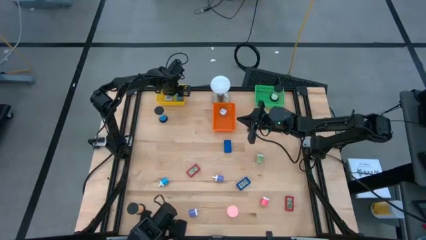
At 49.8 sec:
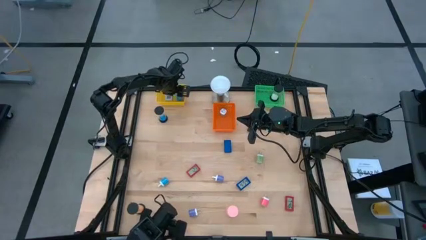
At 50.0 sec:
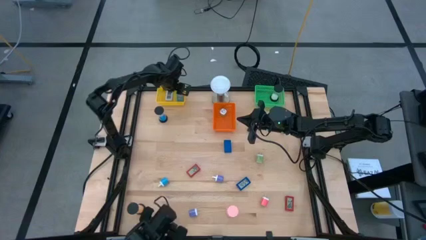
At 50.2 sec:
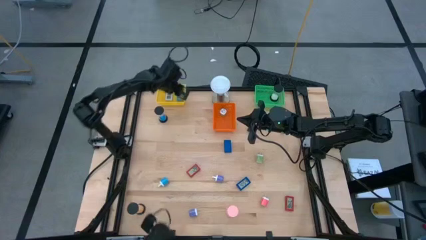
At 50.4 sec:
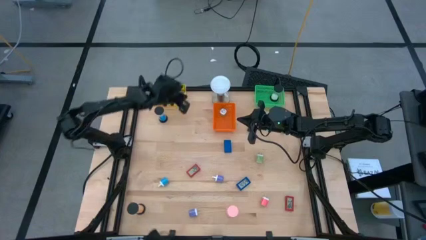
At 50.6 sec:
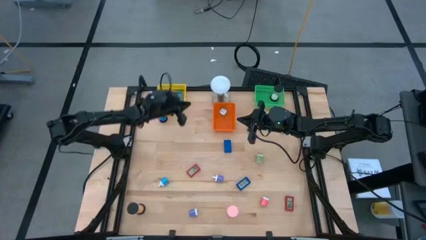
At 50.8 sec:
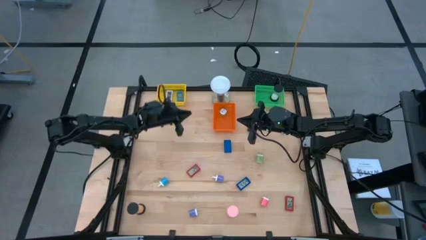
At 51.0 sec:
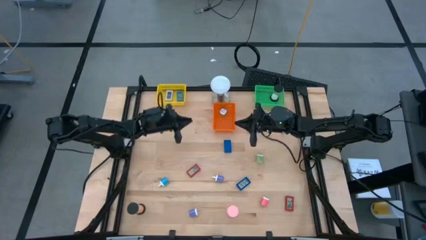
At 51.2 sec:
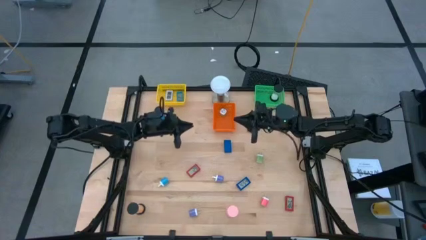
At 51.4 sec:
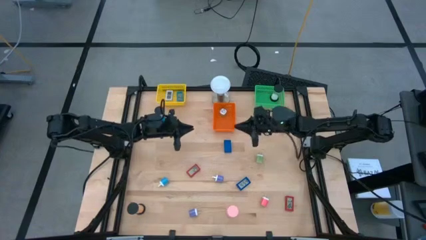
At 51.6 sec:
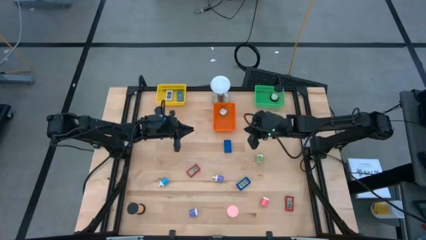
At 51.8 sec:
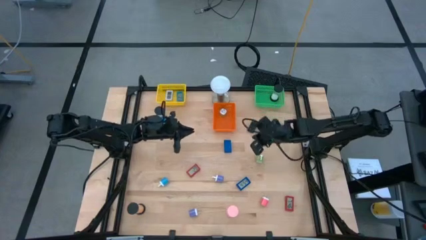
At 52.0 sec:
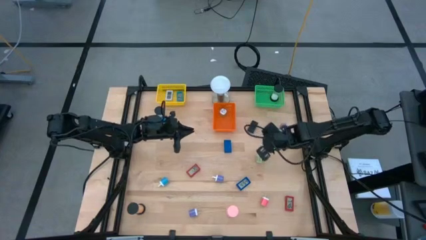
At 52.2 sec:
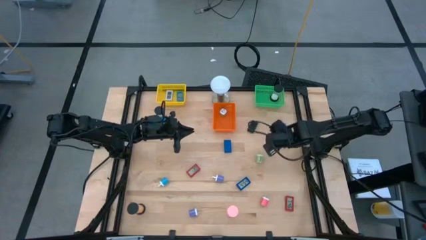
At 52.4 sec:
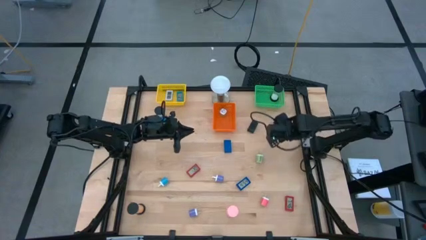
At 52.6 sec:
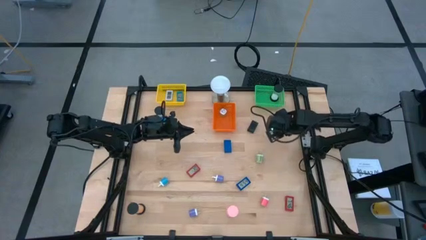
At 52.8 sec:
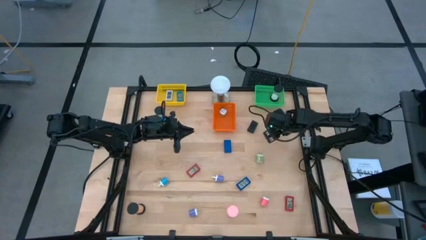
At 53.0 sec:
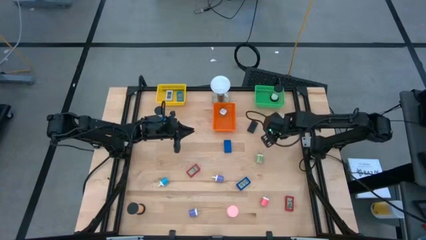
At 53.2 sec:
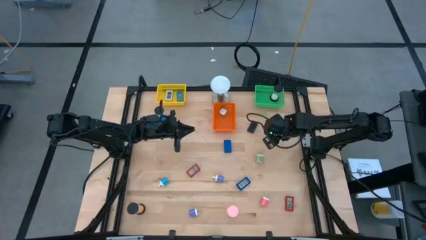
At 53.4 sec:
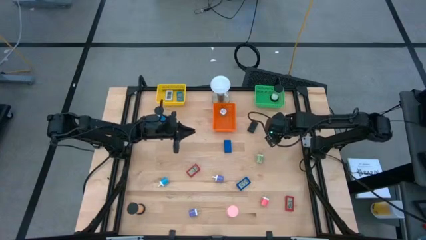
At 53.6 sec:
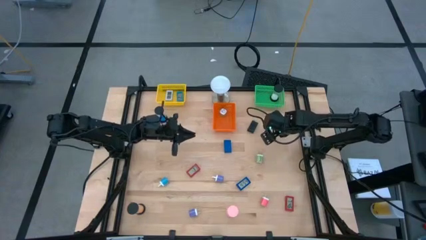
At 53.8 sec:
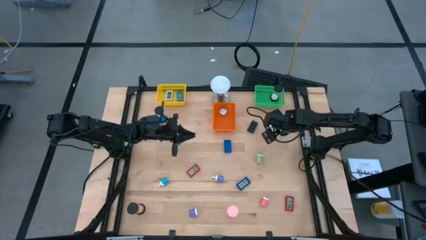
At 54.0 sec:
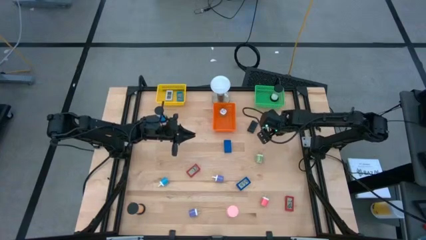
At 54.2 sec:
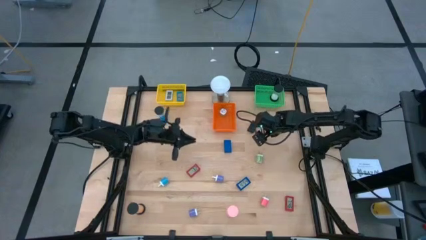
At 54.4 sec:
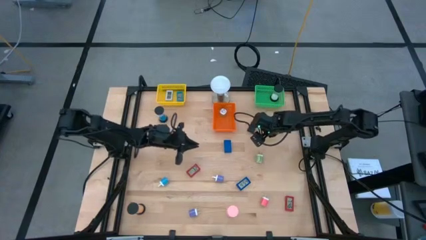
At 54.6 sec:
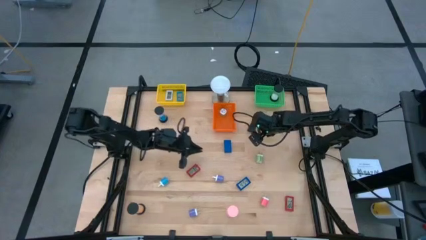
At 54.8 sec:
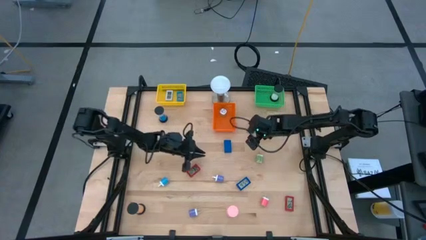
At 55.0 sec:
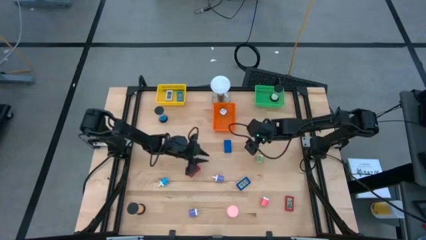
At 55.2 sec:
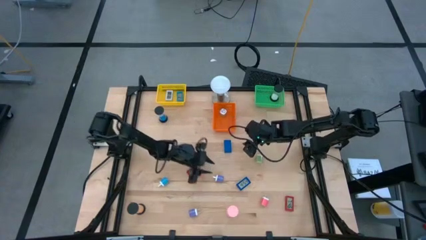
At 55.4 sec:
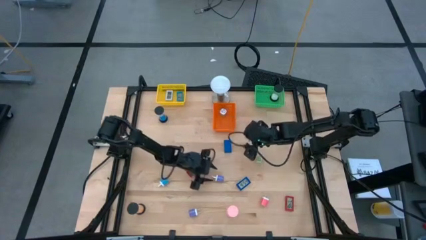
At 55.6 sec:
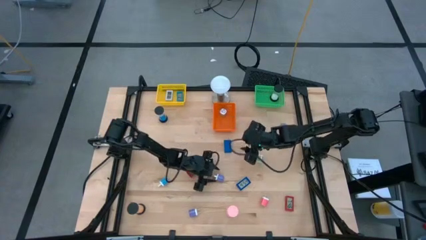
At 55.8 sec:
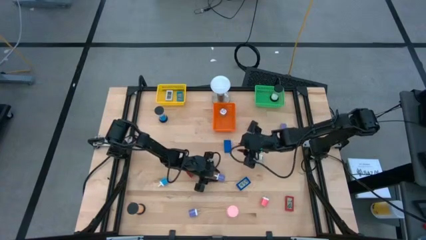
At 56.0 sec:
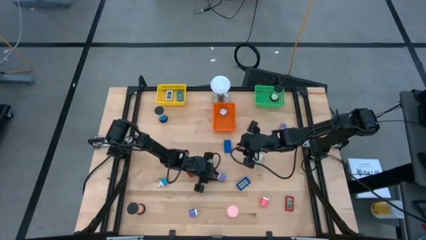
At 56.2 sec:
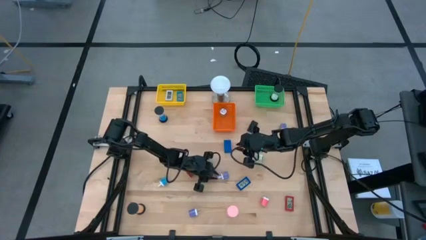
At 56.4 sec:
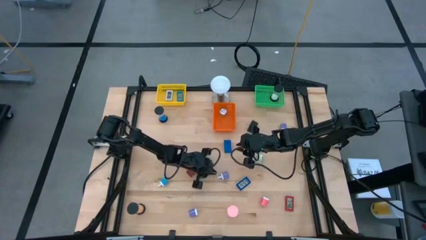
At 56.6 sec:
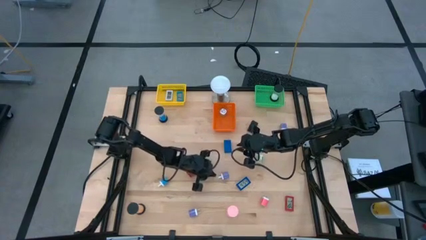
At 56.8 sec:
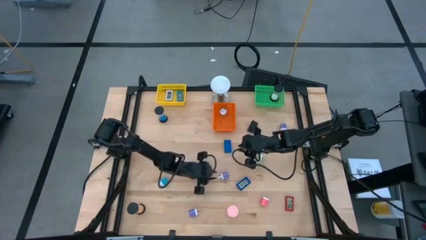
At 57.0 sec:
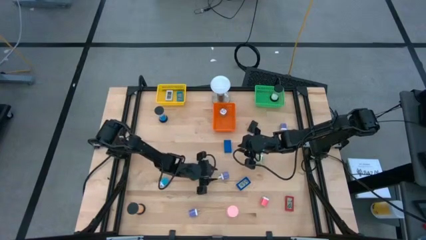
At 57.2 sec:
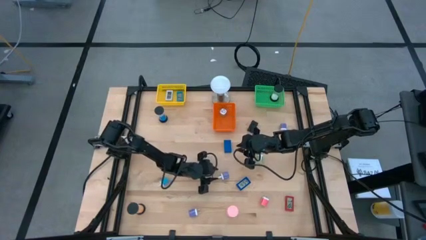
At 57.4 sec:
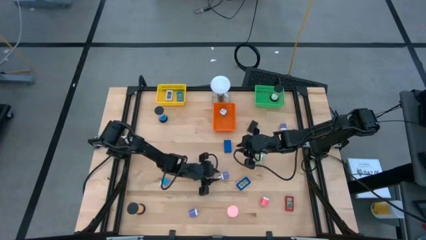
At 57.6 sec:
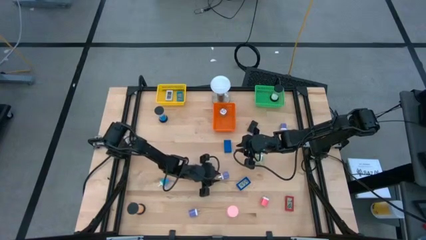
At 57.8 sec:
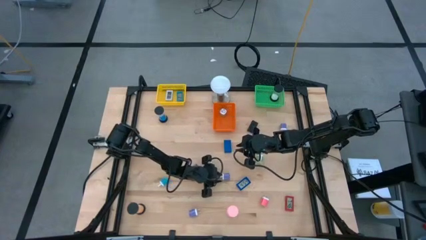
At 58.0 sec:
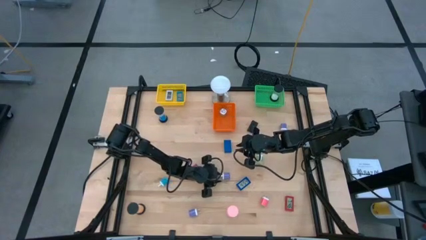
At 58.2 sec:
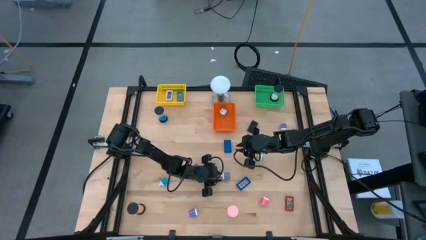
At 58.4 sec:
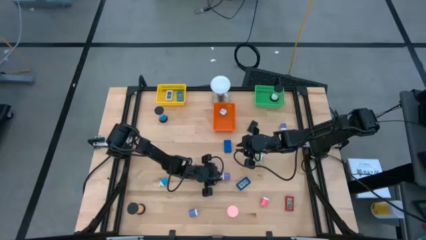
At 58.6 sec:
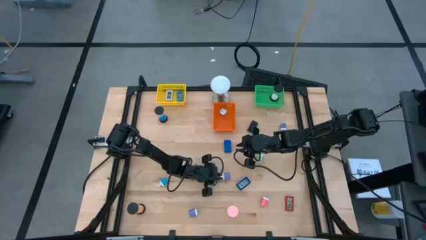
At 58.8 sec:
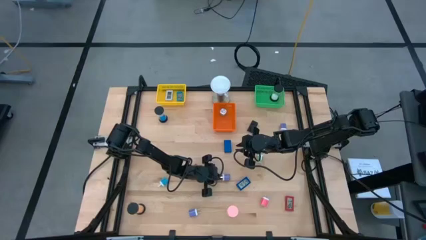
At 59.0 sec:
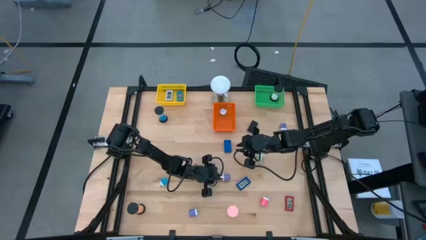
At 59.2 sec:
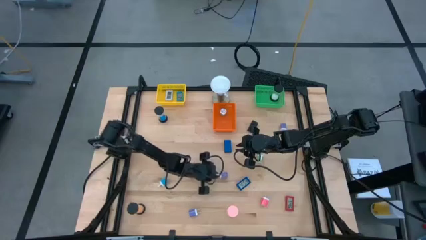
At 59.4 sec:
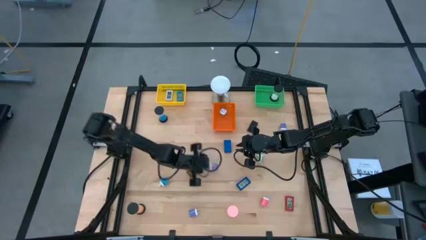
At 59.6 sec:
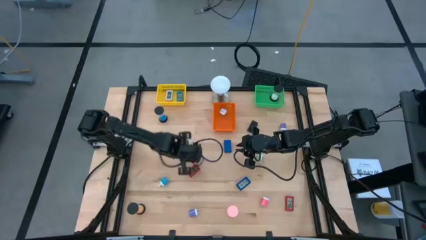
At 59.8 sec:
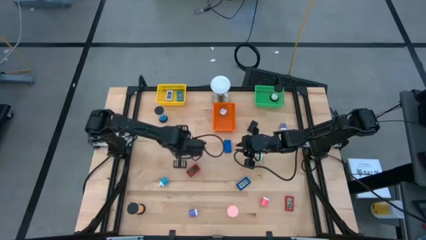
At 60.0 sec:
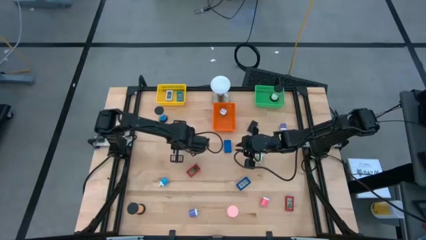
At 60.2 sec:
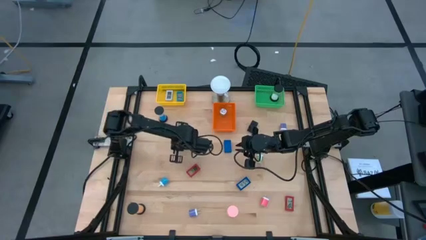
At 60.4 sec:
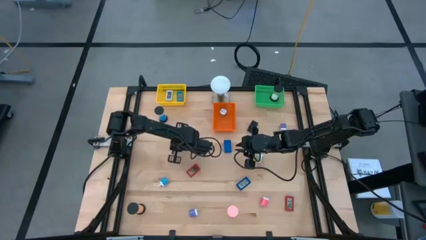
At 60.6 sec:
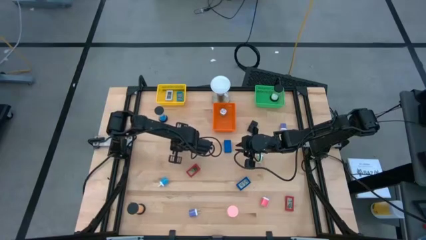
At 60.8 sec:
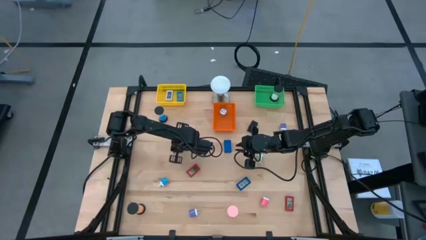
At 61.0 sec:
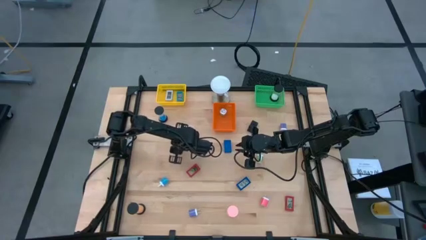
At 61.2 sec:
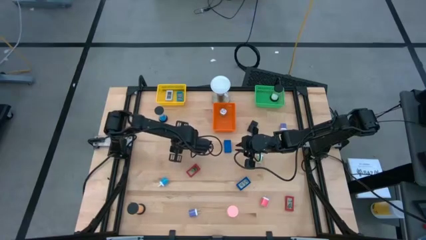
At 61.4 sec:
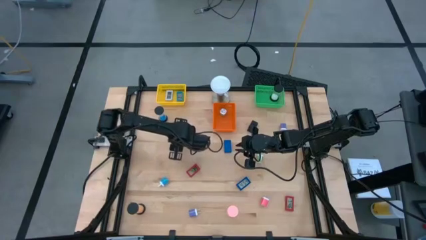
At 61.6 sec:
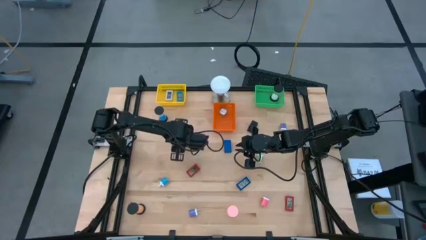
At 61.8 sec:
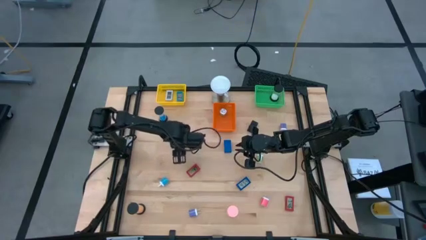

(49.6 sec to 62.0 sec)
Task: Pick & Place Office items
Put the middle purple charger adapter into the orange bin
